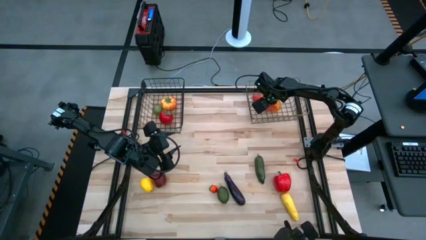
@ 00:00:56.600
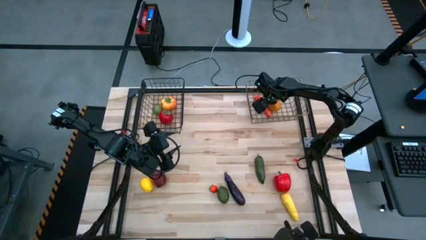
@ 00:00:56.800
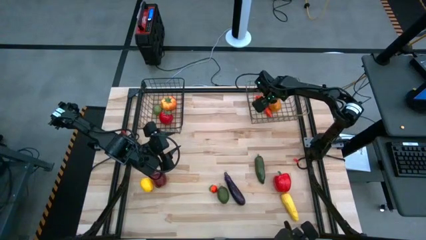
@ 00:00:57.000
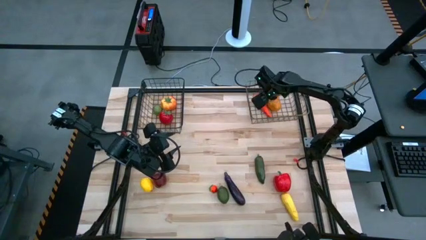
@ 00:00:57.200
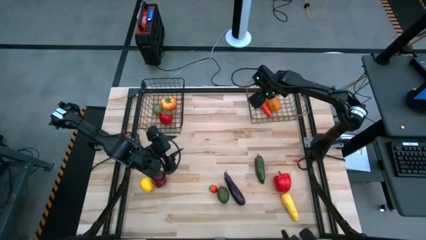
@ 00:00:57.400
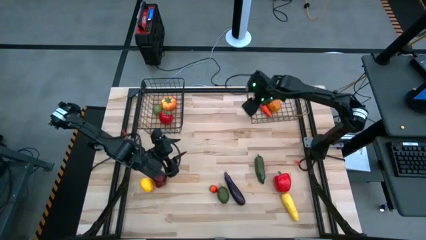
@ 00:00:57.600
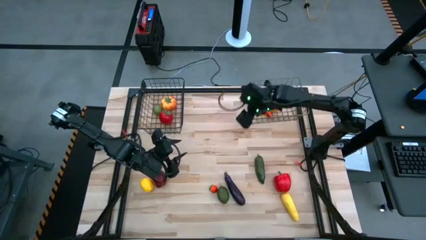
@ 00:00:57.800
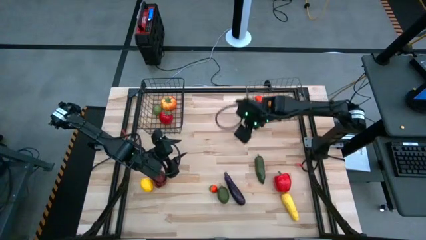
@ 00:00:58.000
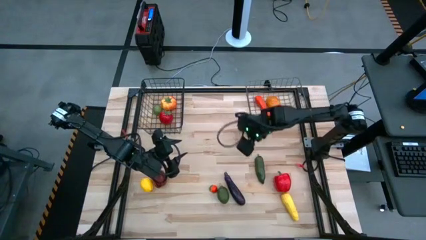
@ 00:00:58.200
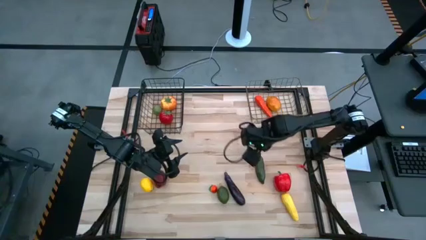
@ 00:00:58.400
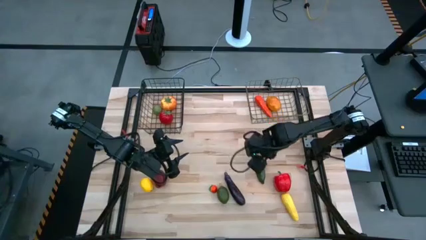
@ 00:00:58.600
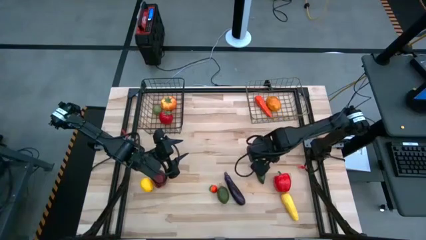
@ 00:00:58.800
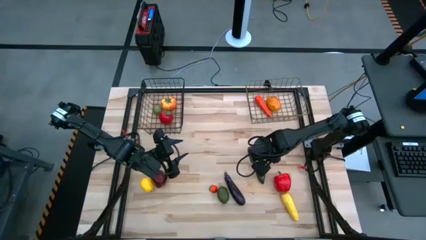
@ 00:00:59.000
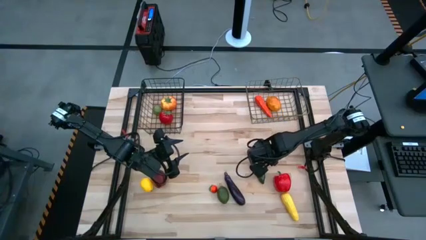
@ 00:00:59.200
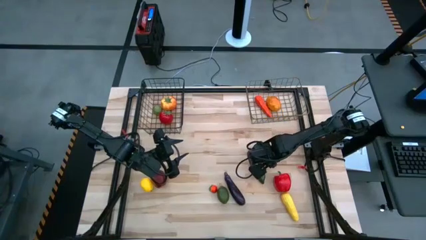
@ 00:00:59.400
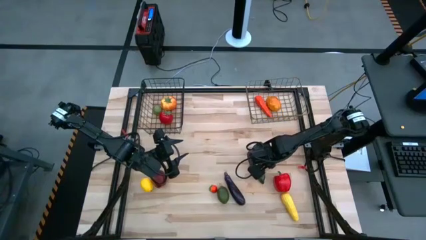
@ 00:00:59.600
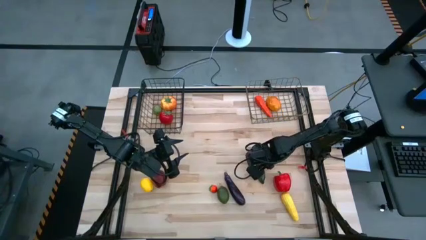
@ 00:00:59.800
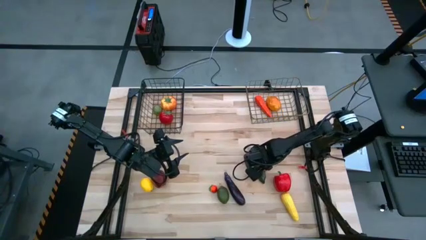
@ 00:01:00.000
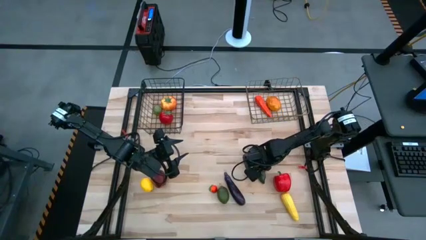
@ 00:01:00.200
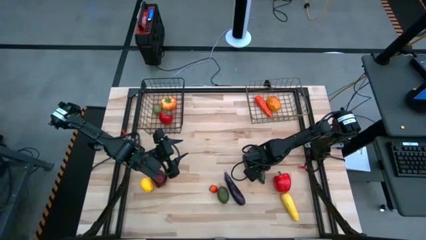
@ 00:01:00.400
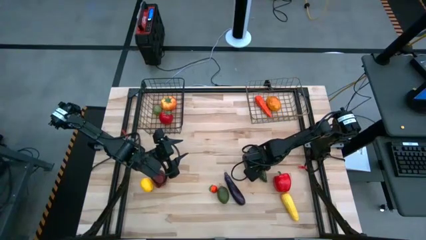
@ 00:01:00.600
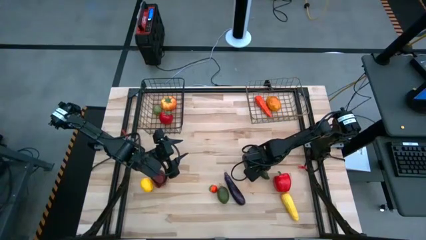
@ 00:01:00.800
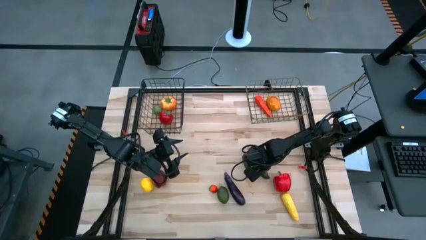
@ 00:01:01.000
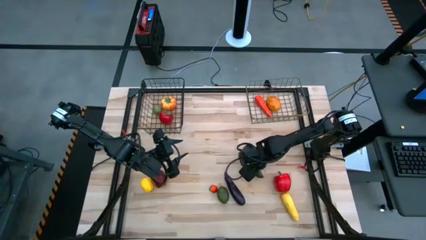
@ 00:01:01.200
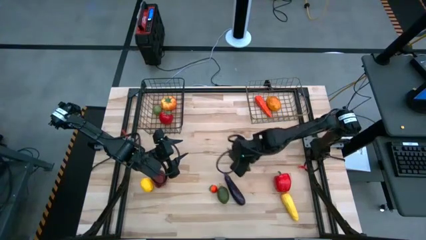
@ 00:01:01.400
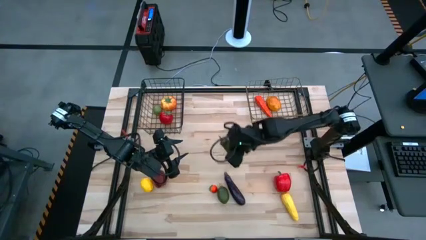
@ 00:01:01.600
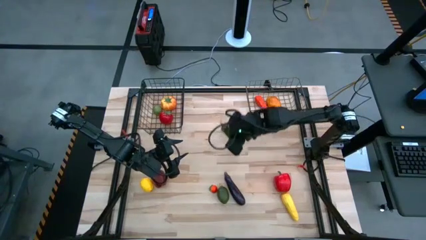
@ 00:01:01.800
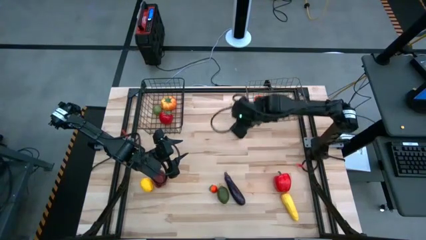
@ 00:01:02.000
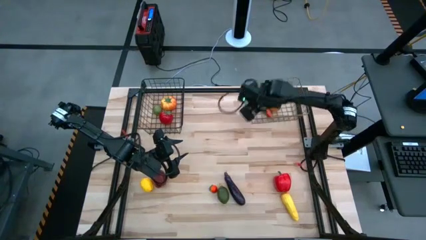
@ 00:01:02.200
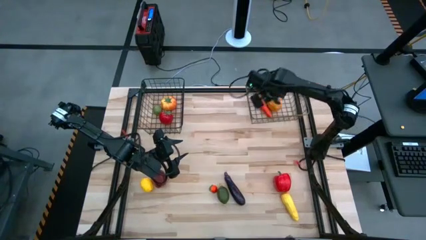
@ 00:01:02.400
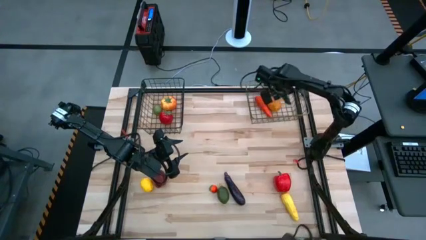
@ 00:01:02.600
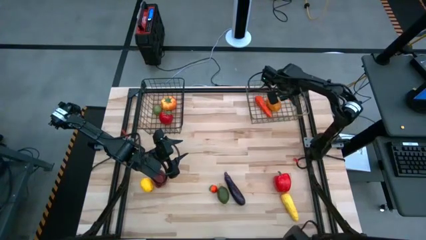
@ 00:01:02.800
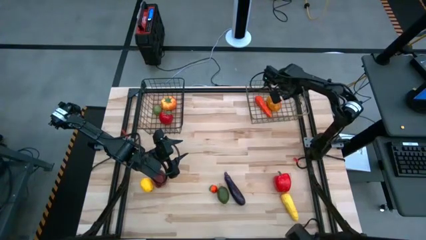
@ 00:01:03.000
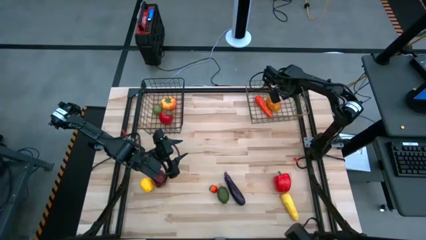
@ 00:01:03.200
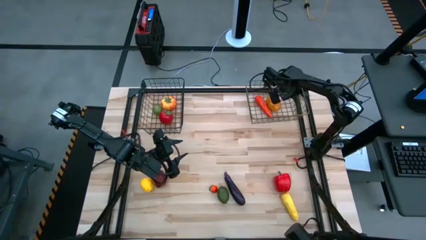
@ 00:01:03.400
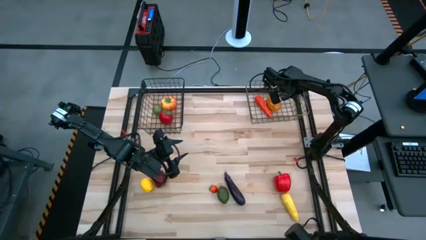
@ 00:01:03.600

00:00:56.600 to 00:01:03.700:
Task: Sort produce into baskets
Put the green chili pepper into the right wire basket

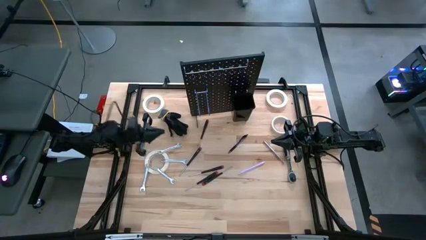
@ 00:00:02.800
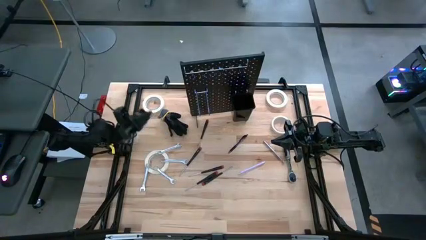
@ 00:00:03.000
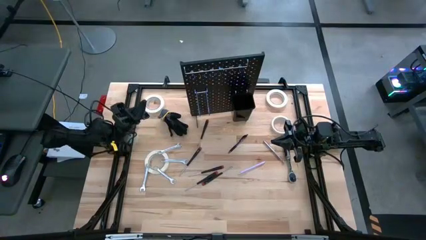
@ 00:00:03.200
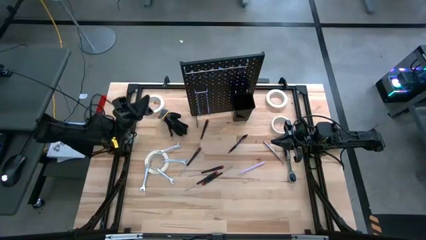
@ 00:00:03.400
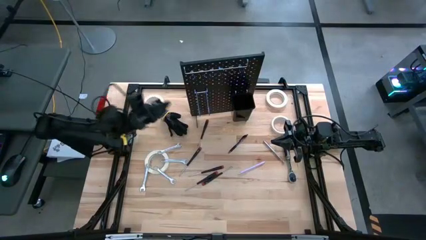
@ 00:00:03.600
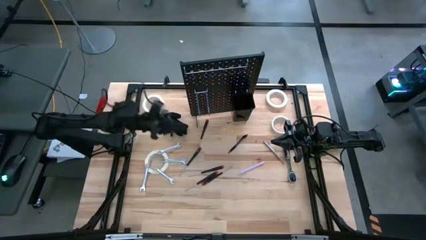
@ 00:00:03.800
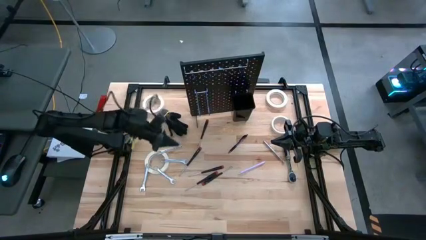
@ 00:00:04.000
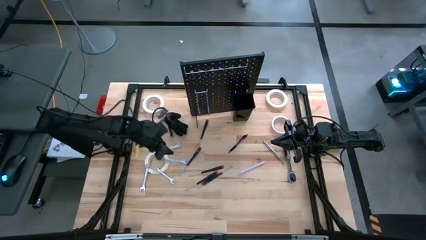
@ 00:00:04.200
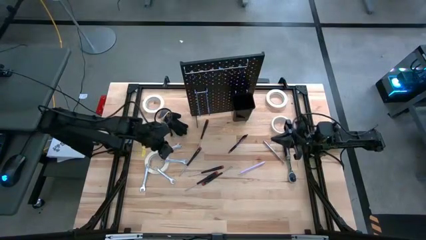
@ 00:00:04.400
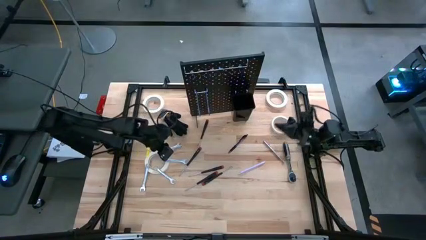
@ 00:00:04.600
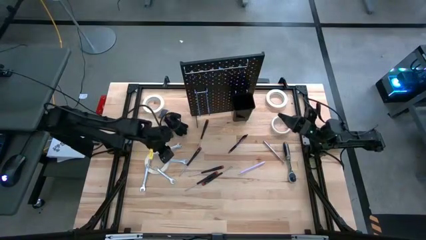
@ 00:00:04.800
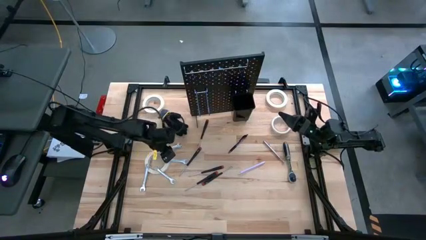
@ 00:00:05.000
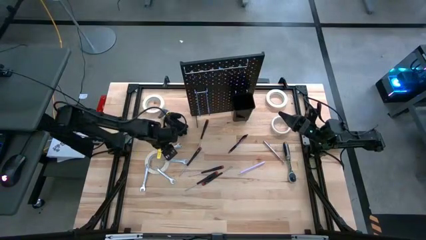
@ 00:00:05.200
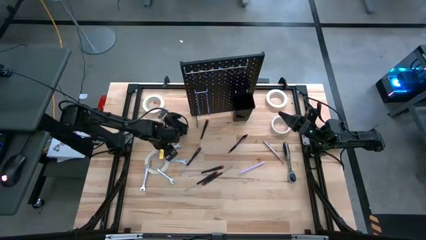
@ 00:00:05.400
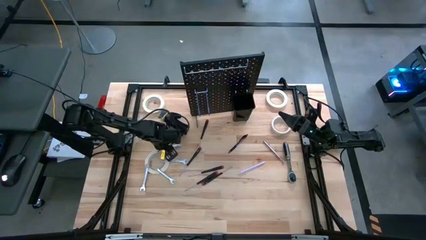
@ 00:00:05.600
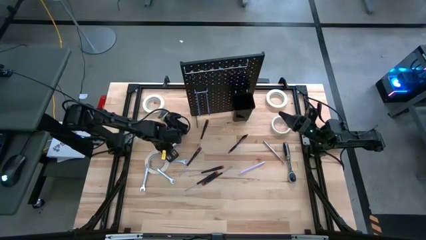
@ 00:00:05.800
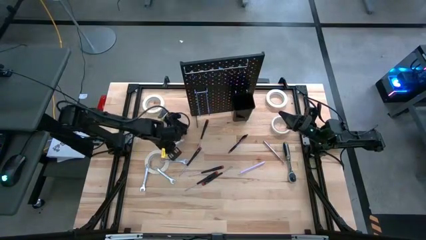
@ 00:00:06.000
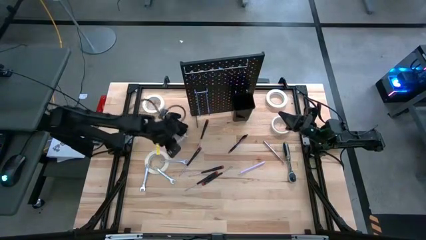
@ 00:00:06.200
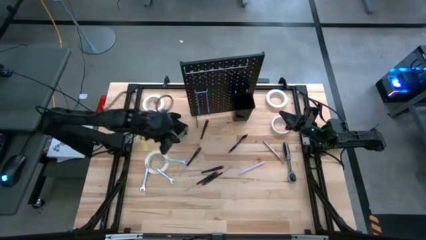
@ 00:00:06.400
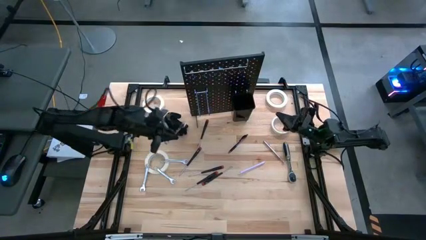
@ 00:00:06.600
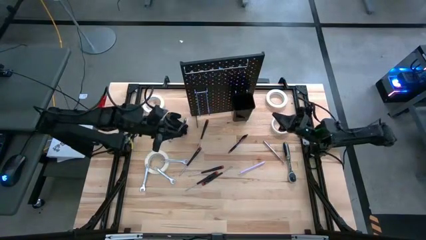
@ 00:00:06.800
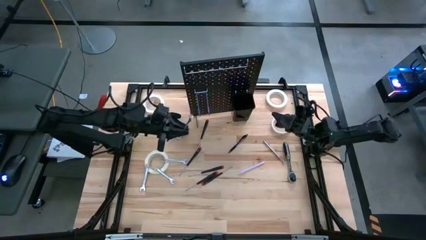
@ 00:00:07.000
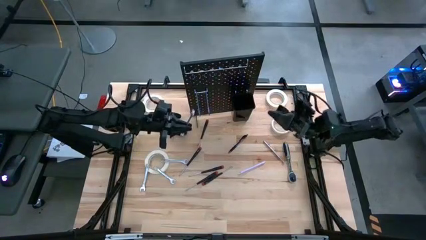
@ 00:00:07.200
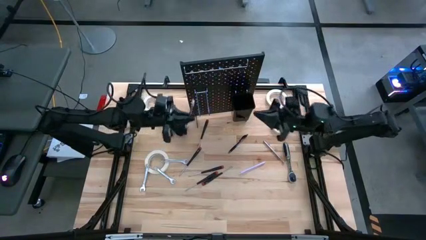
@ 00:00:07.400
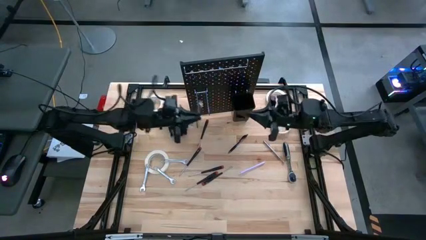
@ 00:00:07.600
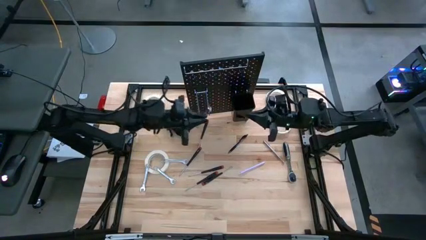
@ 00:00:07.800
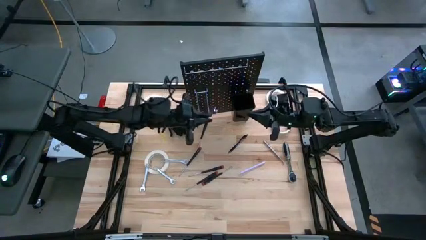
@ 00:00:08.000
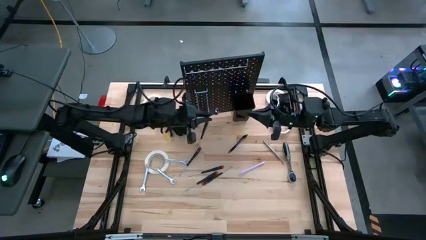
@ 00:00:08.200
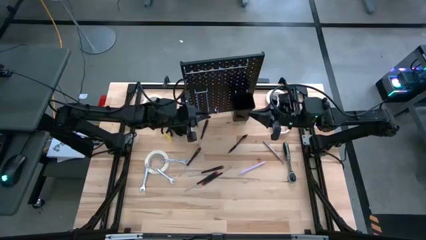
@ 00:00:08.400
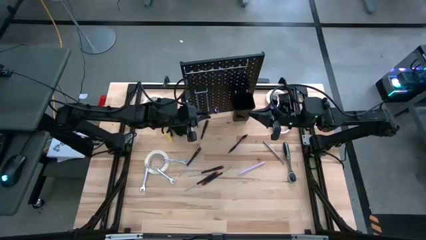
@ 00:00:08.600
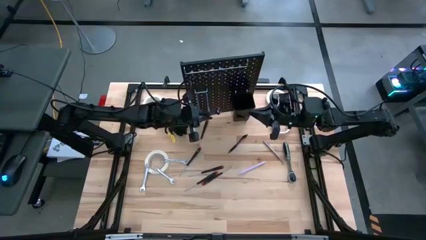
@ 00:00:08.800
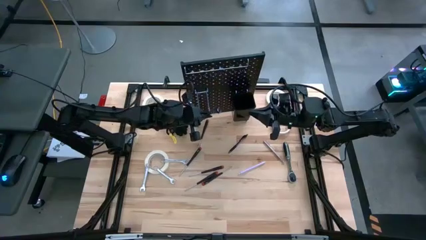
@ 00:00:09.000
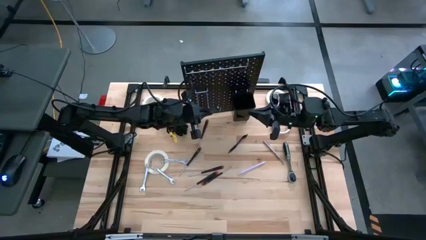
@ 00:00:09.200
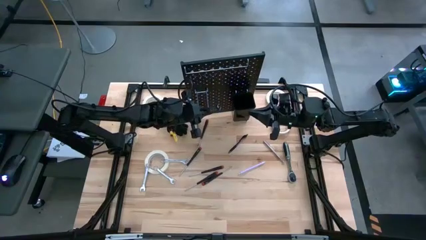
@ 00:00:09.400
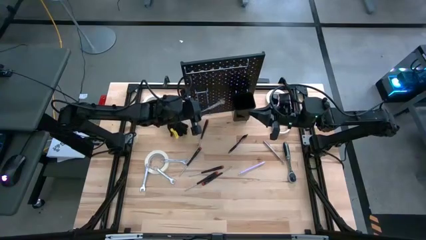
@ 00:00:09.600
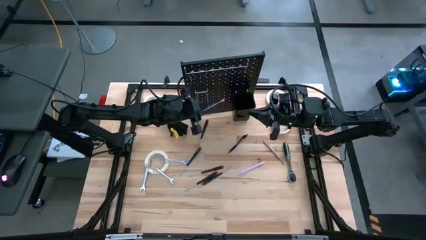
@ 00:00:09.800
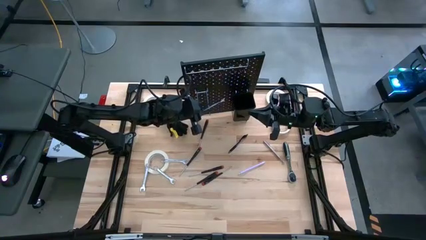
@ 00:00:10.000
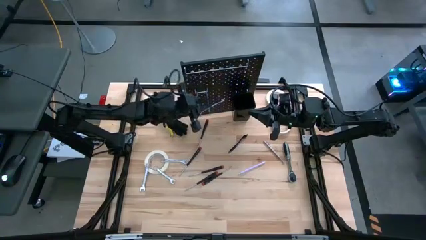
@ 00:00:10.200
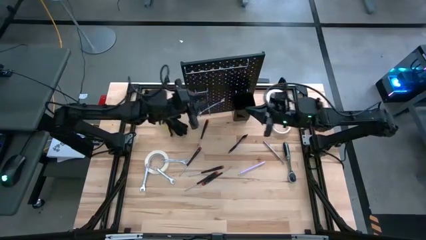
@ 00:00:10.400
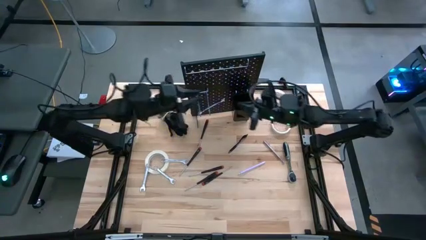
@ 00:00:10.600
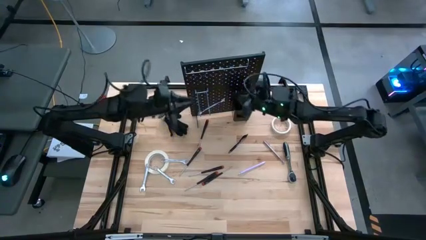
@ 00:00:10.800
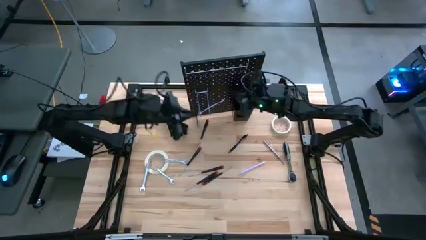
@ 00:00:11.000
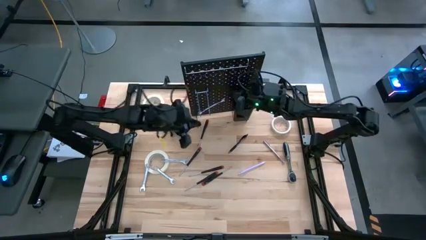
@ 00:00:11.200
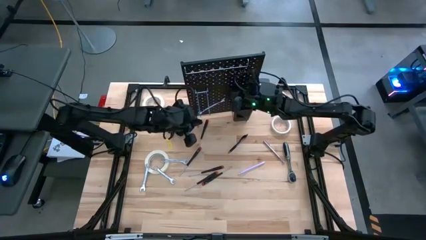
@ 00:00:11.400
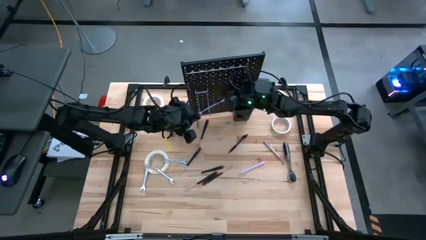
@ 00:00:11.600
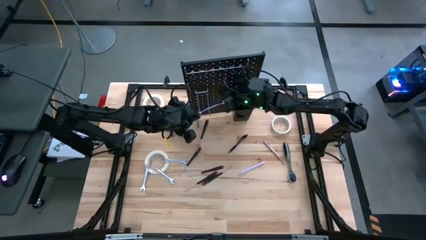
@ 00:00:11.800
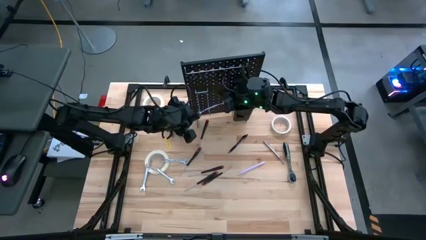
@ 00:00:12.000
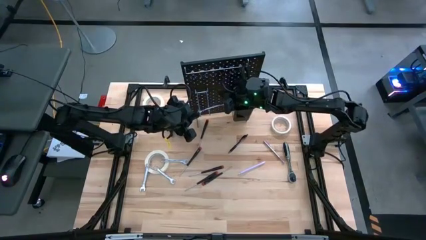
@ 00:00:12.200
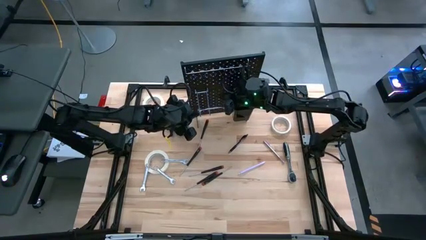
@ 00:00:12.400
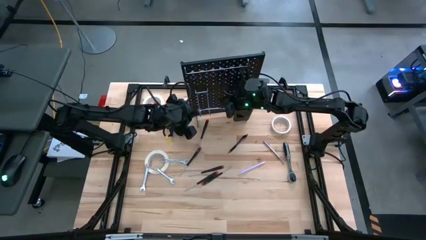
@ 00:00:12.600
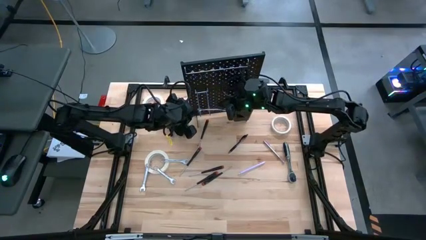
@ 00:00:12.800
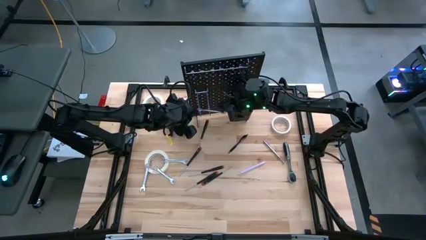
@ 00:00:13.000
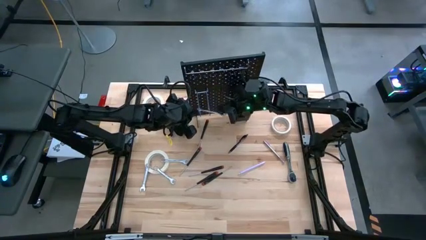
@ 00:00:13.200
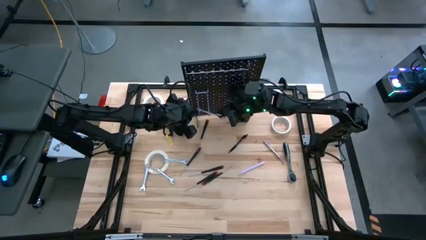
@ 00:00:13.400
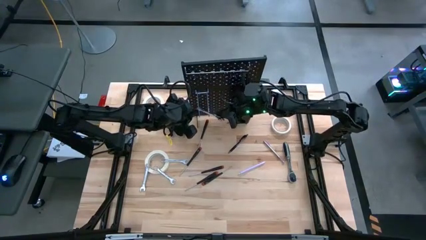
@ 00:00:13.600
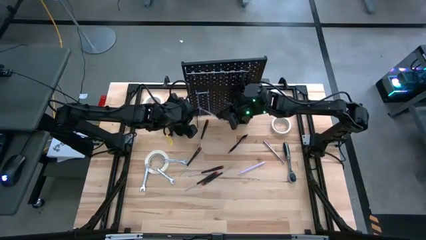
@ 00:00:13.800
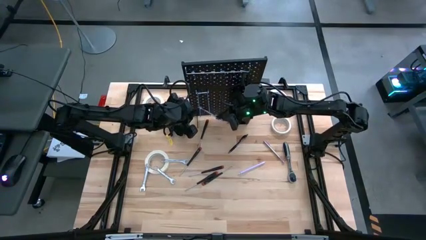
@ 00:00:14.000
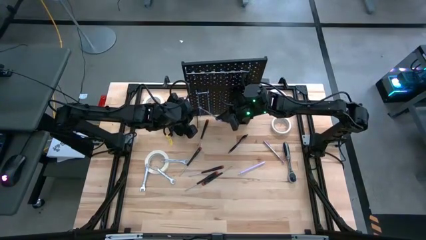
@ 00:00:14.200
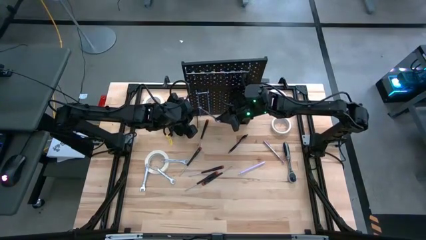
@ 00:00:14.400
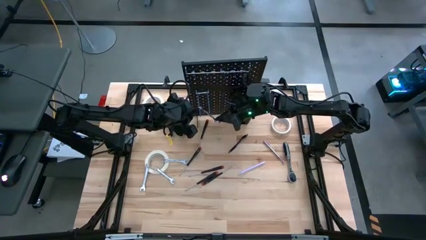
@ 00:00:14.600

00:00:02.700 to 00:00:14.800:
Task: Hang tools onto peg board
Hang the silver wrench on the peg board
